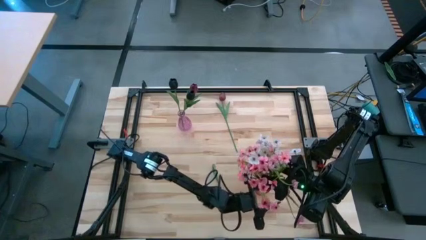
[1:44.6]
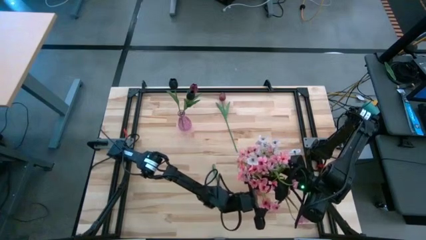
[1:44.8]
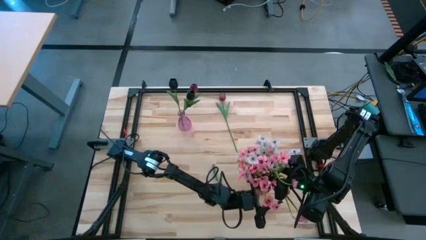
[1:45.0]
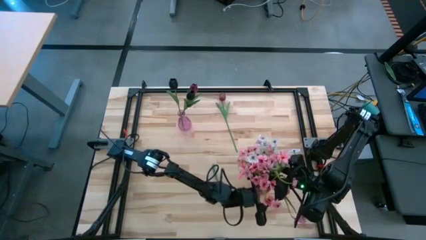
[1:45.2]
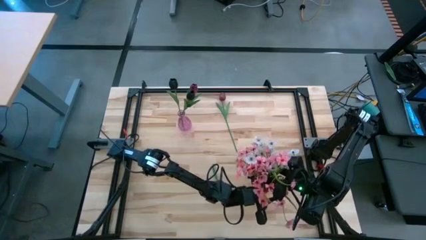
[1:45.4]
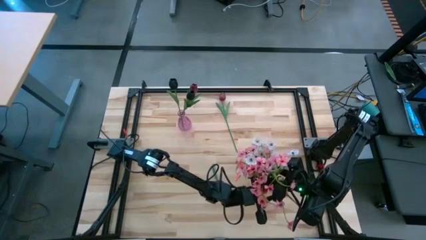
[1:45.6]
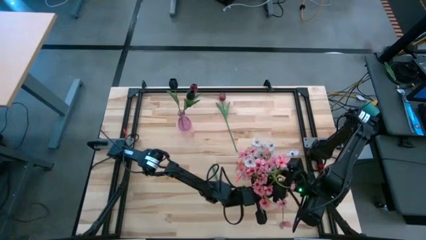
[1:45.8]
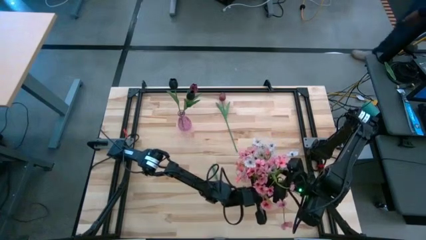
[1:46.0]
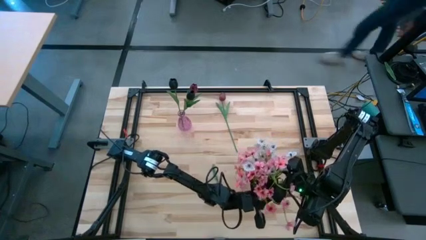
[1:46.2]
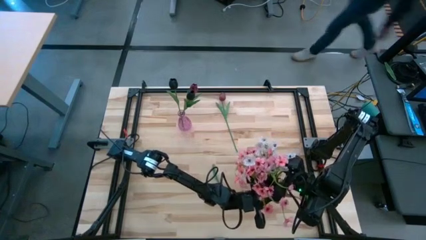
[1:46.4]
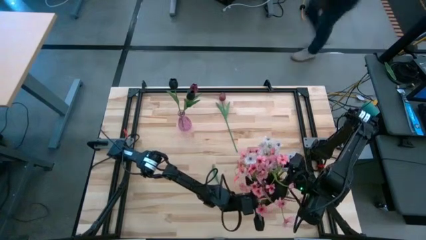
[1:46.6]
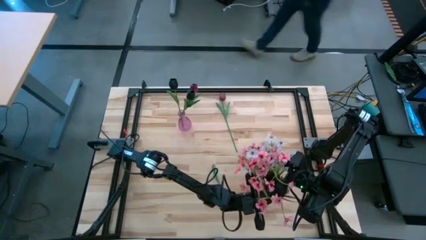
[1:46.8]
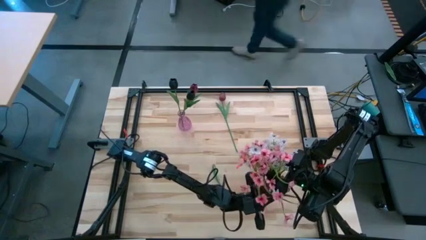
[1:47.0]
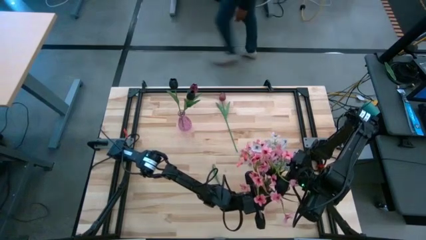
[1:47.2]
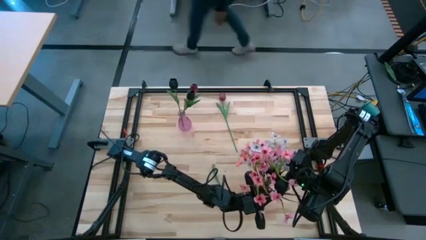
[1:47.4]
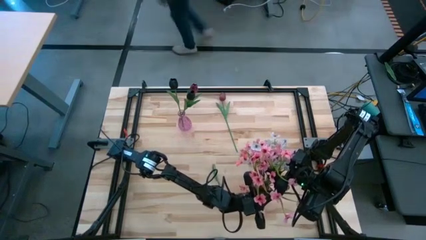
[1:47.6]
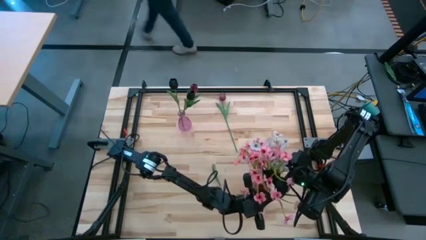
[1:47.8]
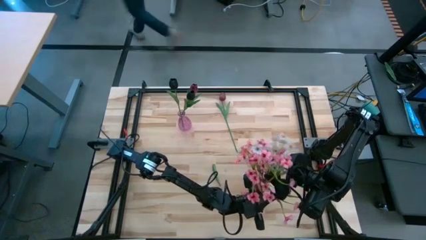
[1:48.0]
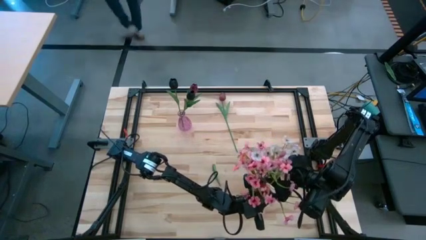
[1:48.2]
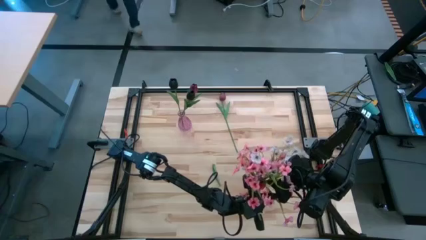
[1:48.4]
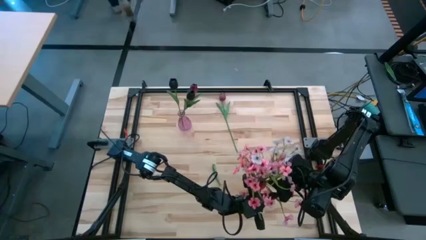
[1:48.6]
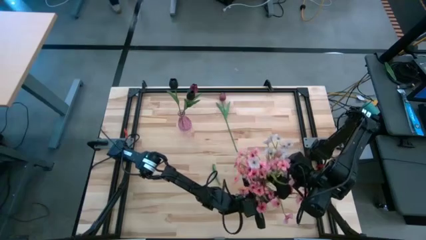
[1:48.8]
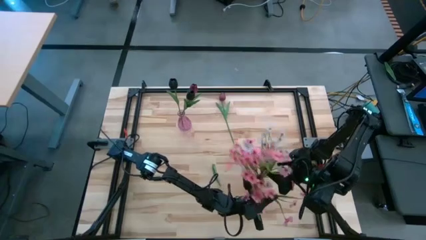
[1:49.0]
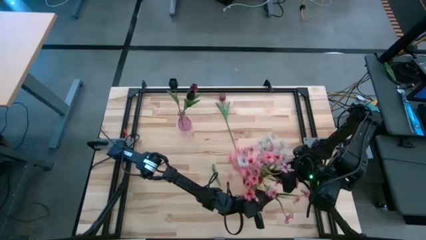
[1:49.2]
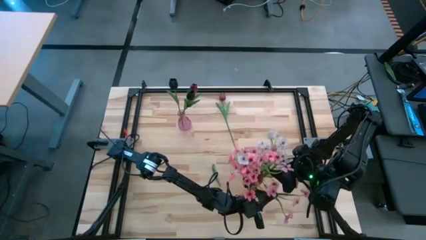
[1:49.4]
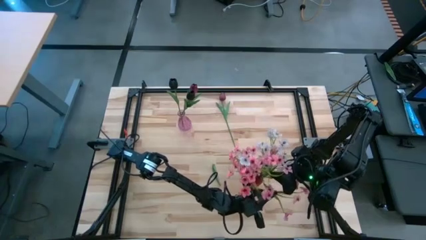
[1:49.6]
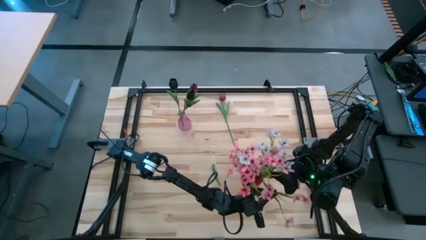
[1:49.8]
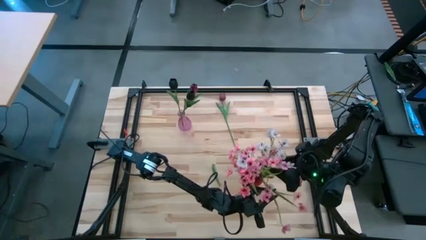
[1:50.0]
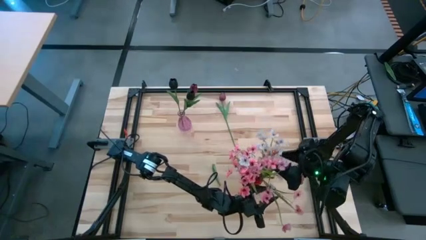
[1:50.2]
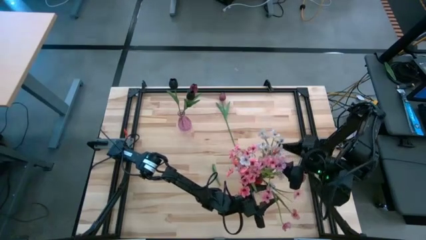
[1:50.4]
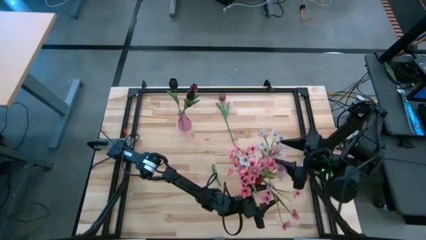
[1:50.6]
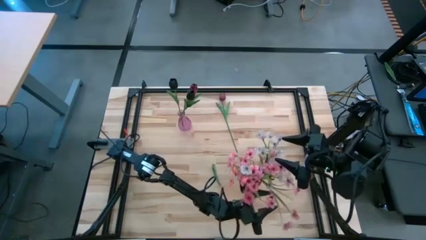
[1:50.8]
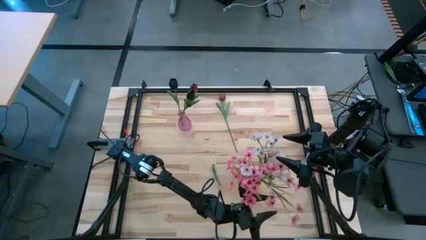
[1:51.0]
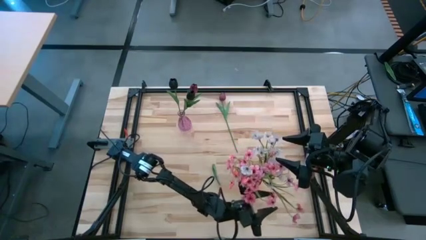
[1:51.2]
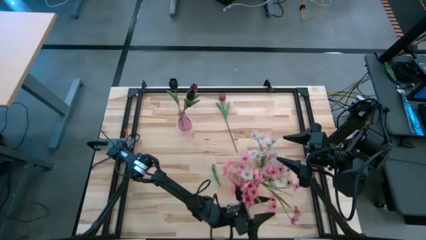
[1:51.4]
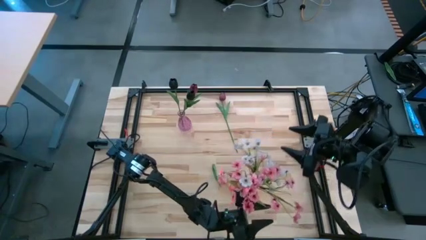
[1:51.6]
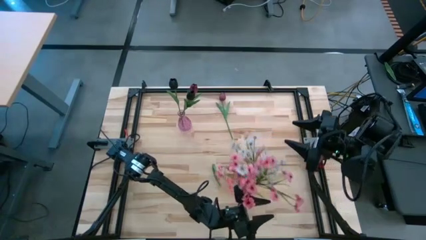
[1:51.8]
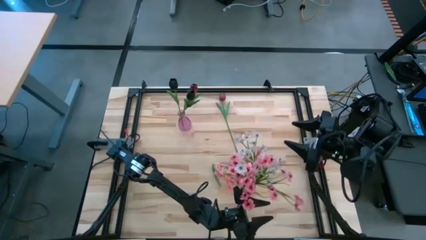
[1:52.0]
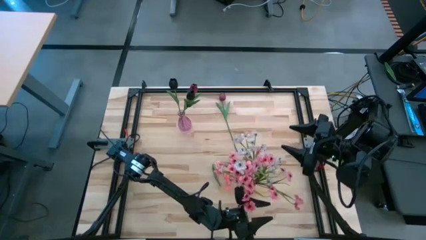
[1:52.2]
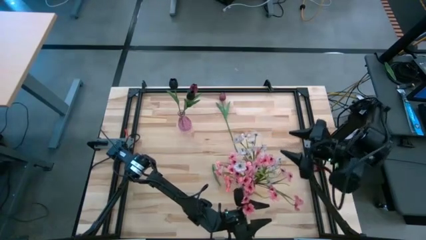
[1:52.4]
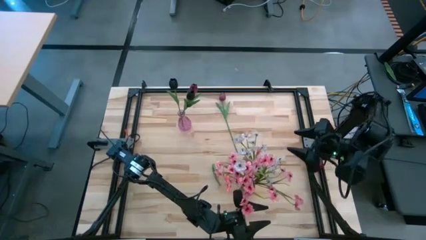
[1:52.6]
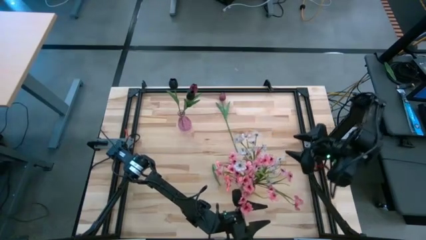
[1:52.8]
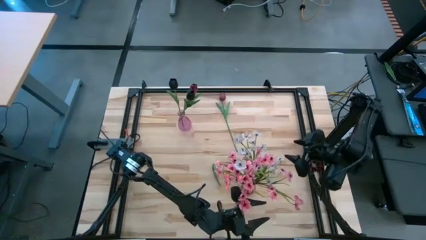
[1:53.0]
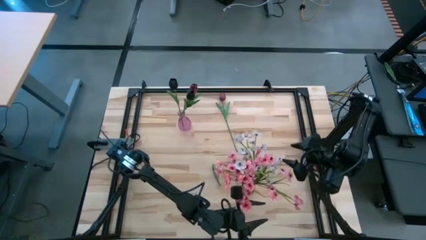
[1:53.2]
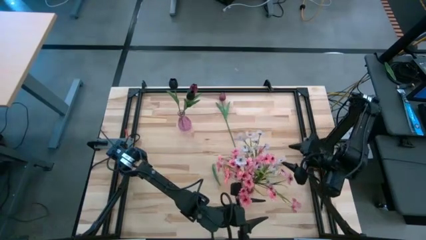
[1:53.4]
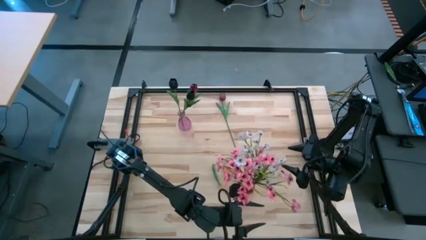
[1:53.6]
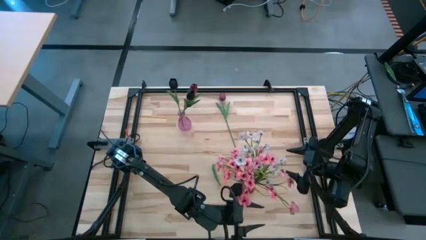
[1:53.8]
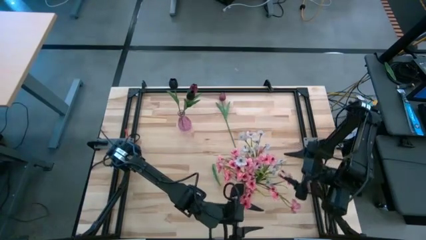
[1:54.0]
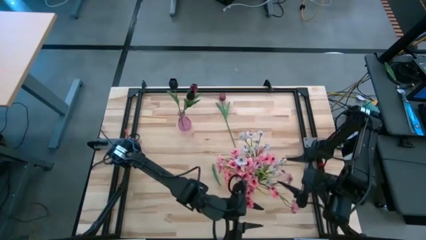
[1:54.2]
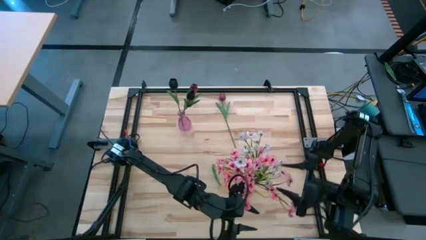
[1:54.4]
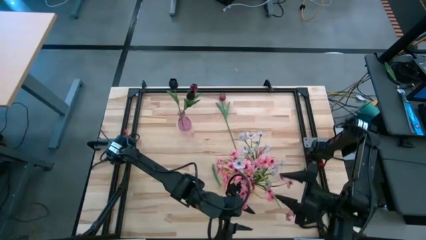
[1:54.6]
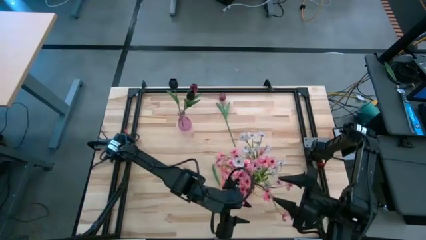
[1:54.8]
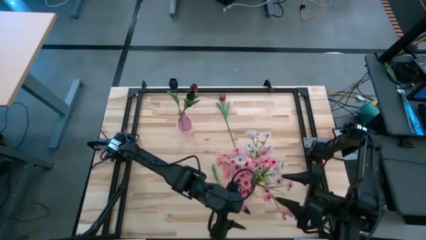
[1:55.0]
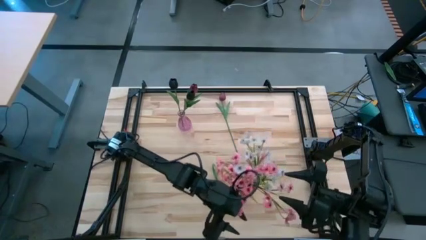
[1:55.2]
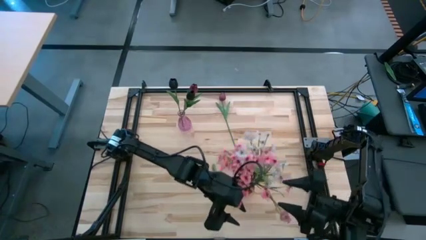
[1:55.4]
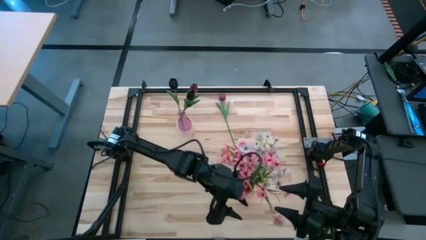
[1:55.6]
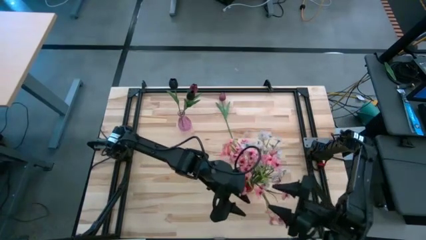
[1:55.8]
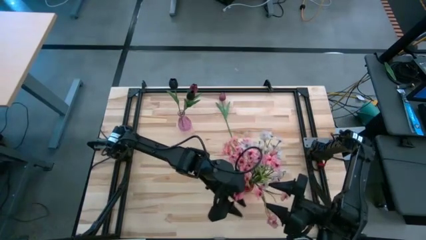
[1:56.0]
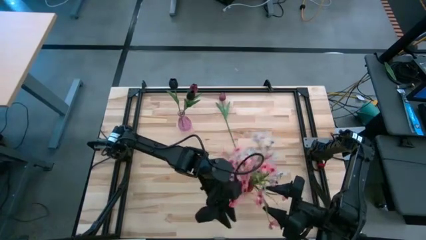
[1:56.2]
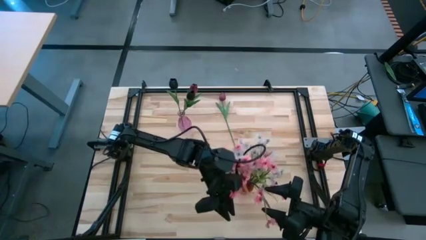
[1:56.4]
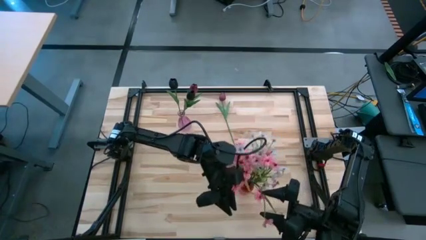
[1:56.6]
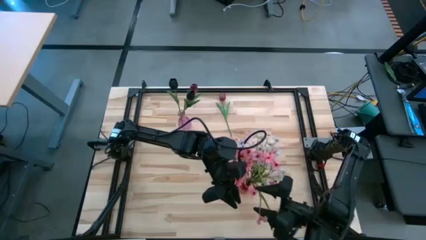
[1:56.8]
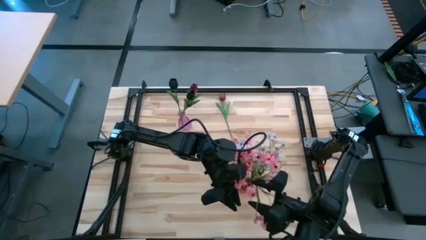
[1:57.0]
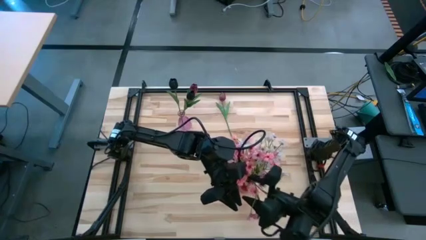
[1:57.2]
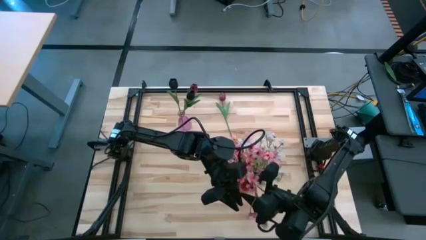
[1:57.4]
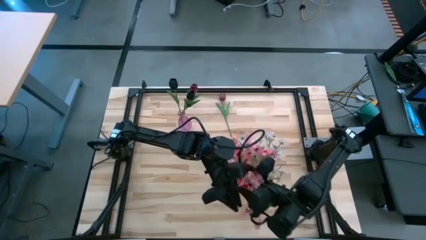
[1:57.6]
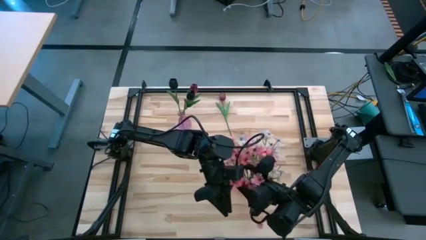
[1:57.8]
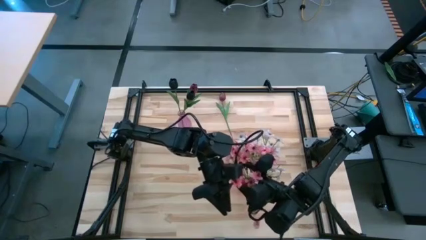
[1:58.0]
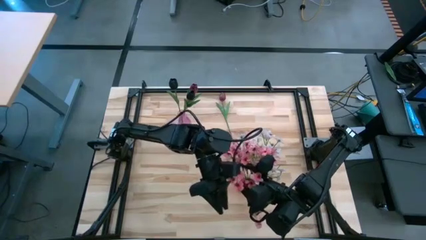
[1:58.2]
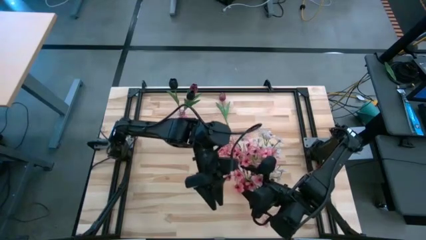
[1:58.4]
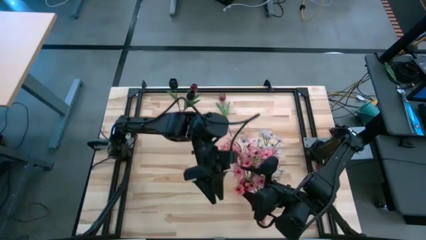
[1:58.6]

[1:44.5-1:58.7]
Task: Sort flowers into vase by color
Put the white flowers into the red vase

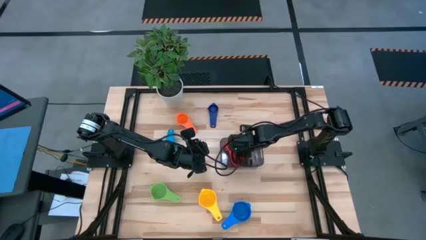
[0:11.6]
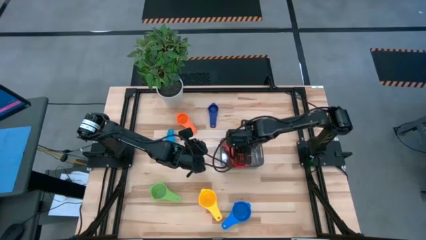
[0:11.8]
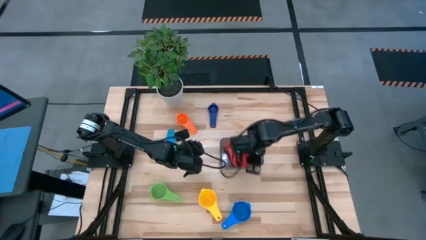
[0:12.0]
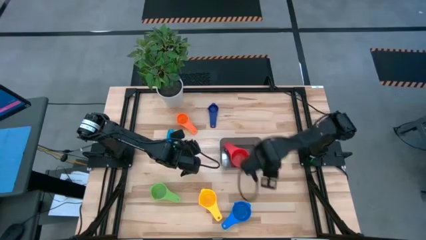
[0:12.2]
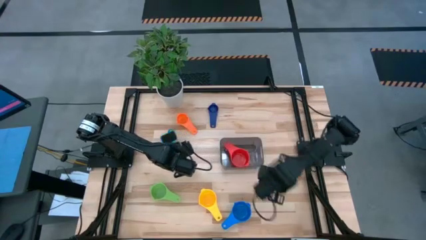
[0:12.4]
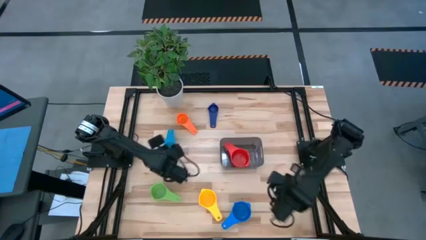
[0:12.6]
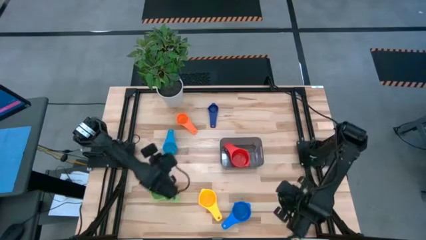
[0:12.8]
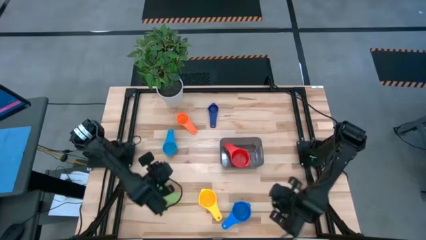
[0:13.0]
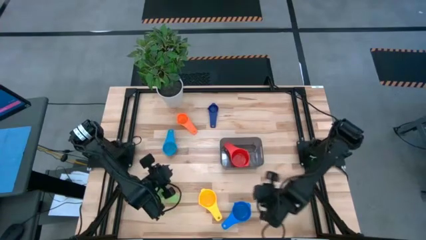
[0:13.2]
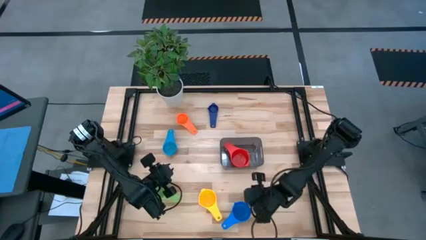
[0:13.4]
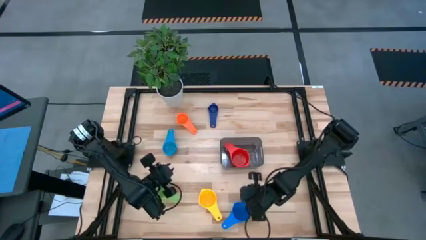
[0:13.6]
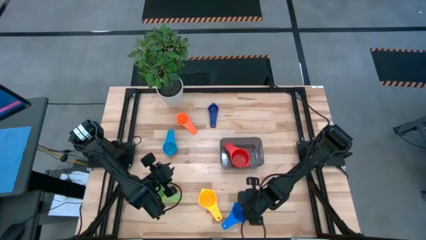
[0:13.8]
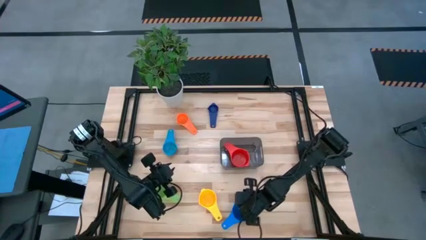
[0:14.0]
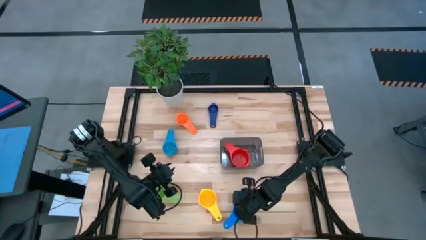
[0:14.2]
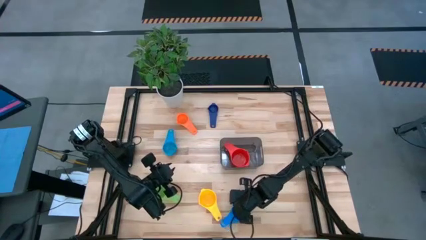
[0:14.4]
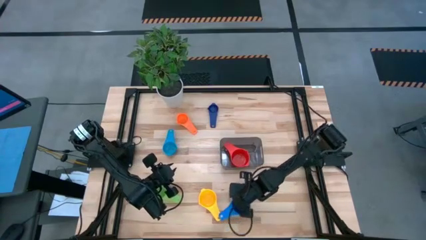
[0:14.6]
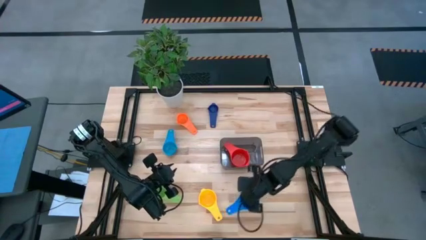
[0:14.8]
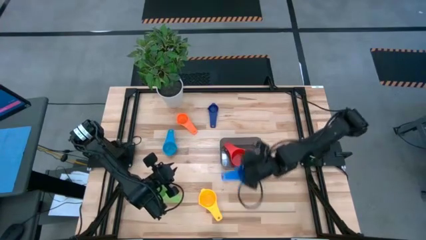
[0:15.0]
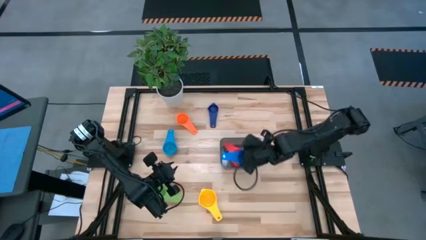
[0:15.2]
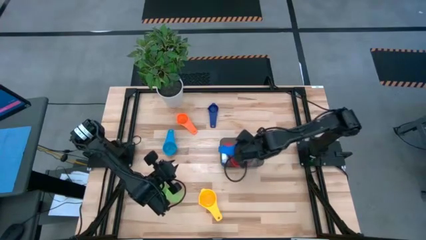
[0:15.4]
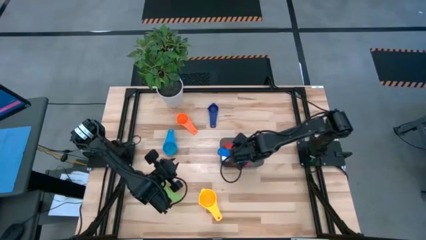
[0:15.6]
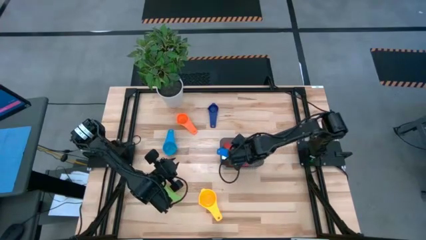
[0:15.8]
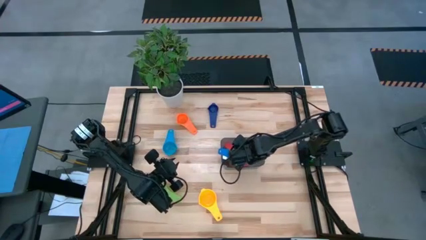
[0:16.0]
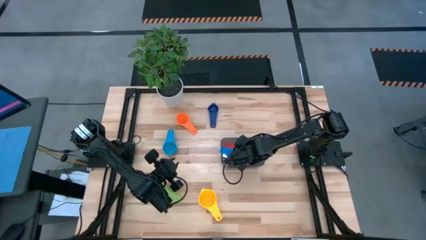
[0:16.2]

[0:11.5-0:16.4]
Task: Nest measuring cups in basket
Stack the blue measuring cup on top of the red measuring cup in the black bin
